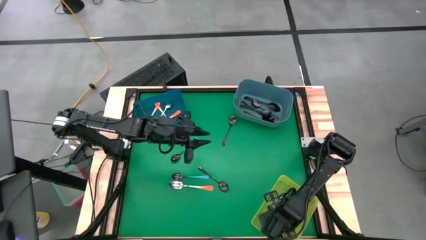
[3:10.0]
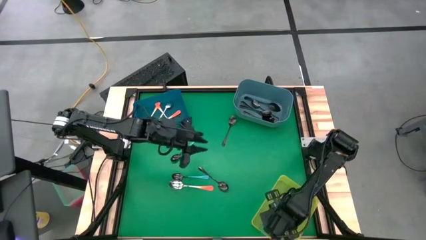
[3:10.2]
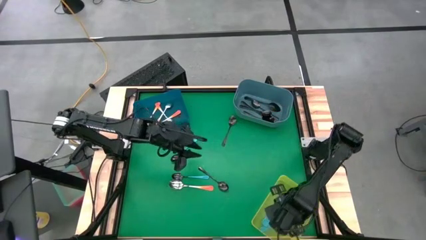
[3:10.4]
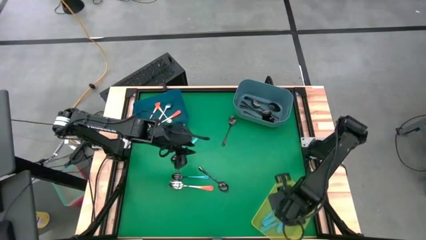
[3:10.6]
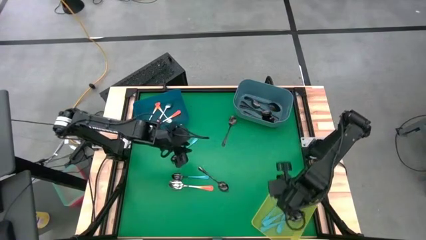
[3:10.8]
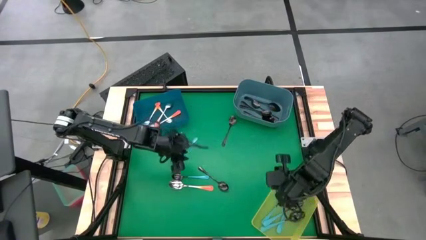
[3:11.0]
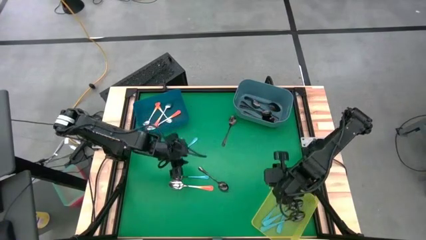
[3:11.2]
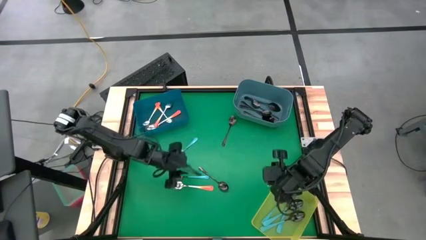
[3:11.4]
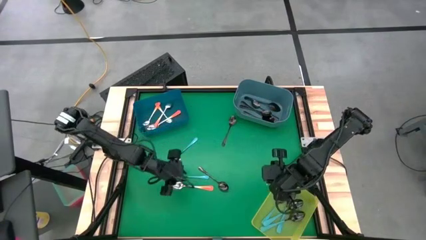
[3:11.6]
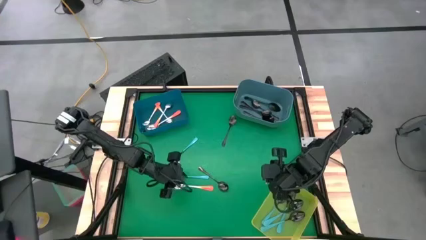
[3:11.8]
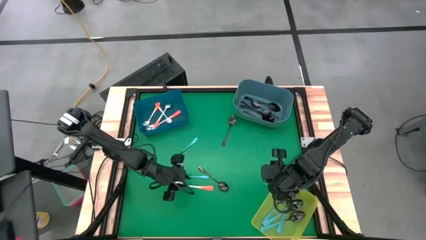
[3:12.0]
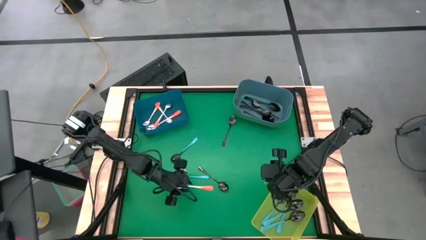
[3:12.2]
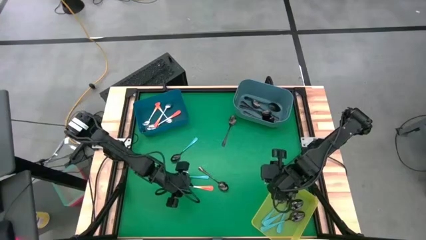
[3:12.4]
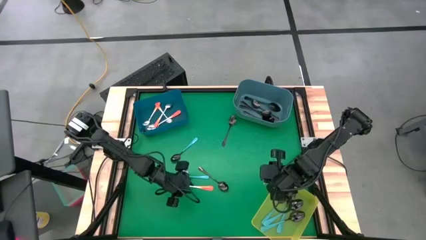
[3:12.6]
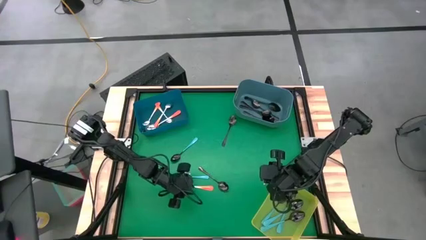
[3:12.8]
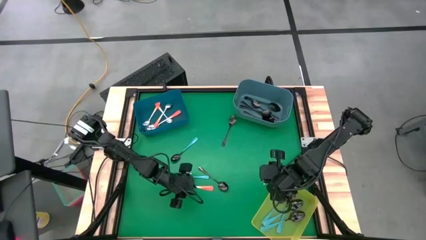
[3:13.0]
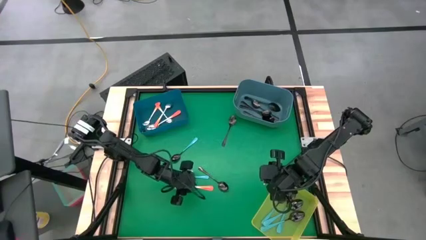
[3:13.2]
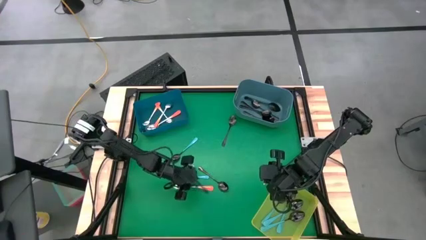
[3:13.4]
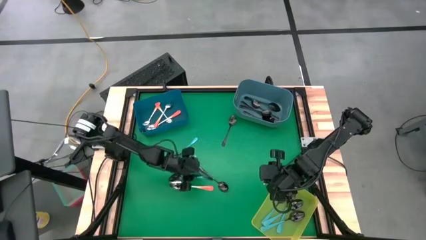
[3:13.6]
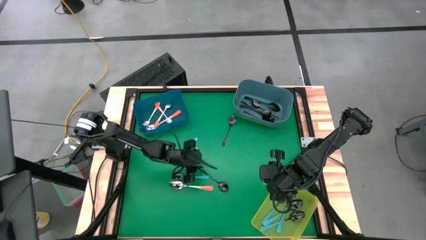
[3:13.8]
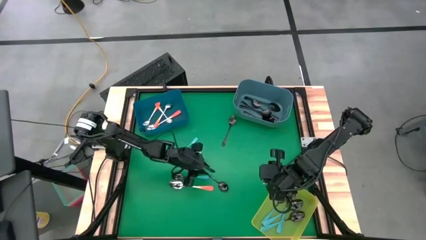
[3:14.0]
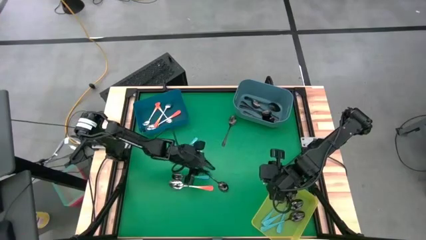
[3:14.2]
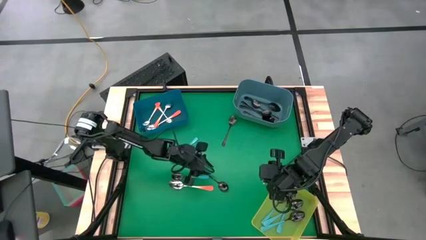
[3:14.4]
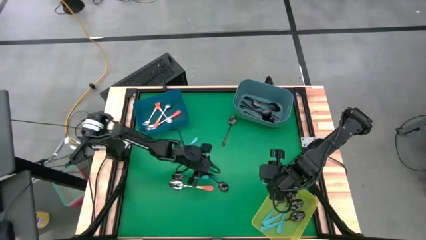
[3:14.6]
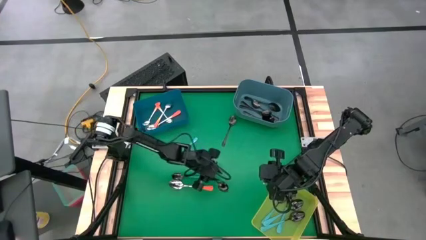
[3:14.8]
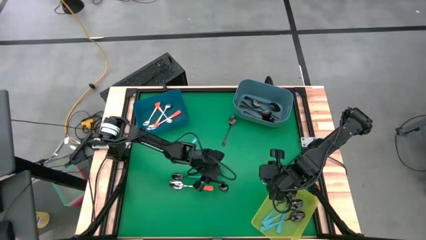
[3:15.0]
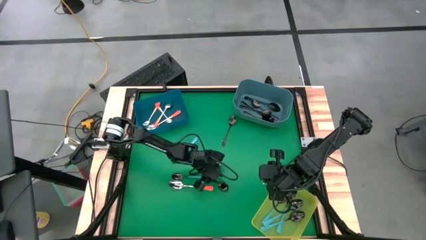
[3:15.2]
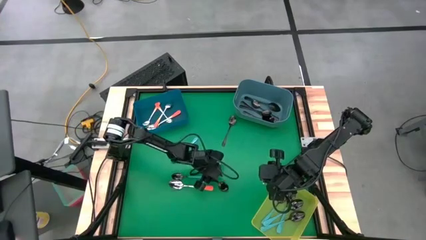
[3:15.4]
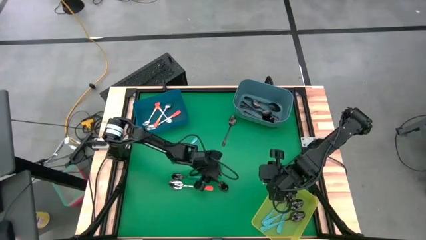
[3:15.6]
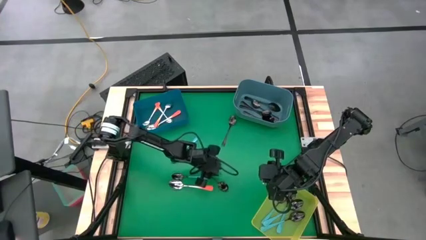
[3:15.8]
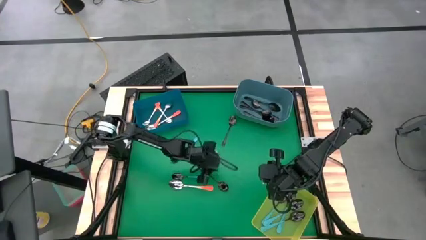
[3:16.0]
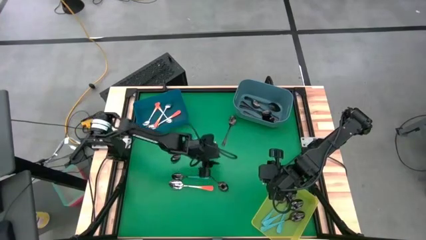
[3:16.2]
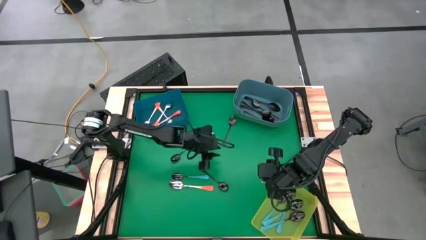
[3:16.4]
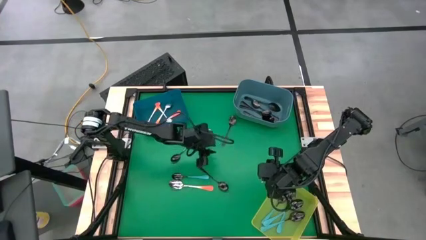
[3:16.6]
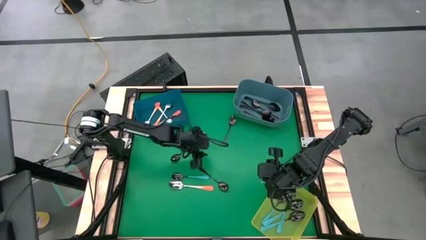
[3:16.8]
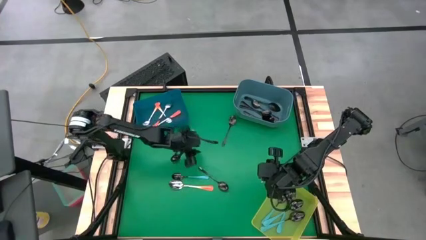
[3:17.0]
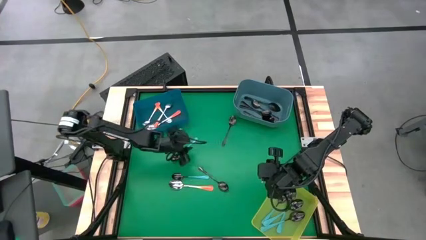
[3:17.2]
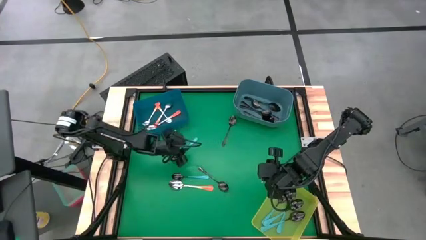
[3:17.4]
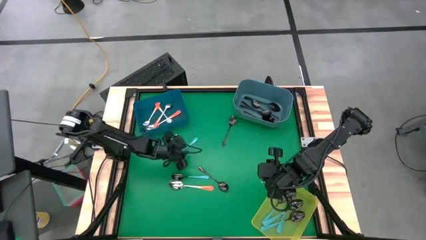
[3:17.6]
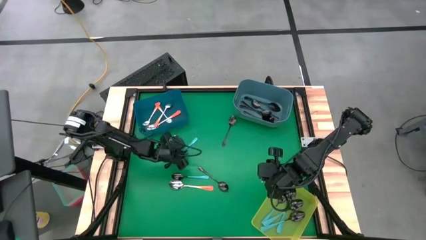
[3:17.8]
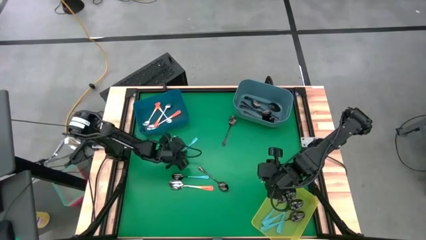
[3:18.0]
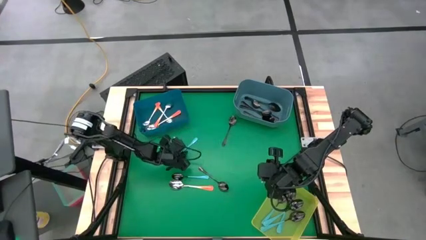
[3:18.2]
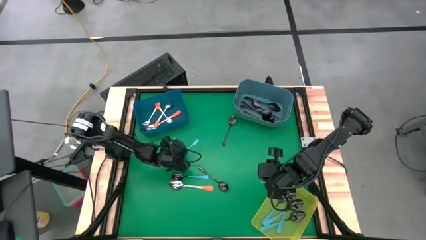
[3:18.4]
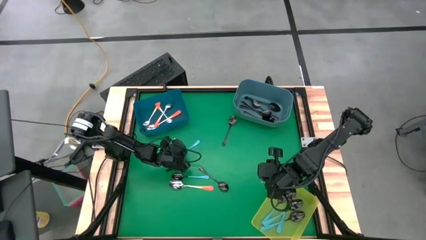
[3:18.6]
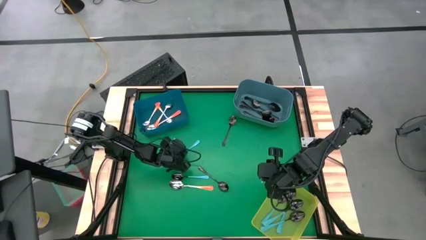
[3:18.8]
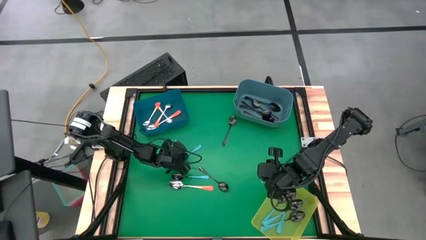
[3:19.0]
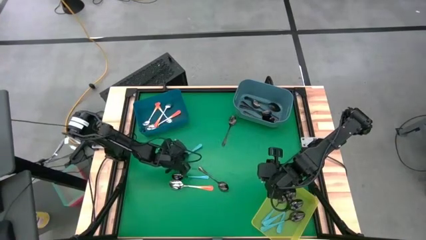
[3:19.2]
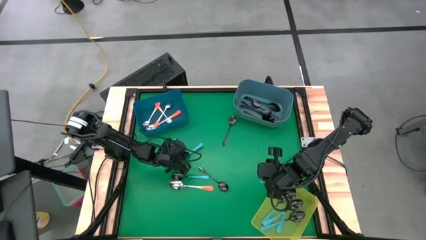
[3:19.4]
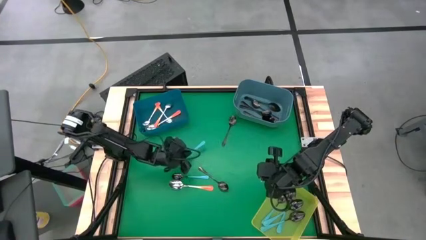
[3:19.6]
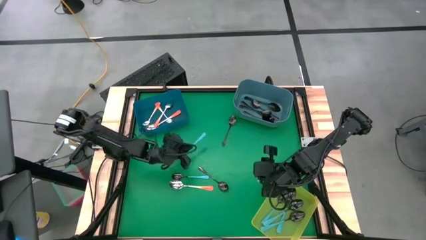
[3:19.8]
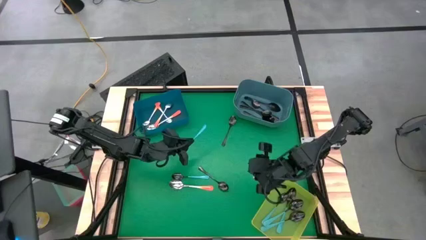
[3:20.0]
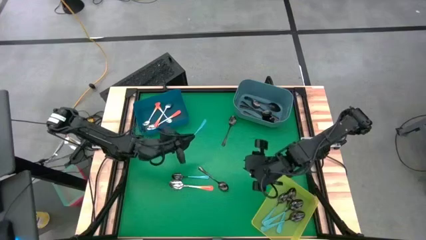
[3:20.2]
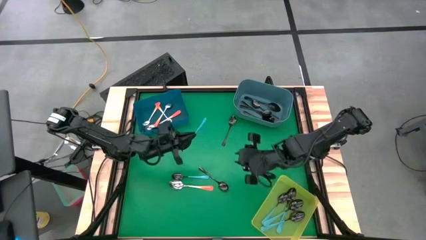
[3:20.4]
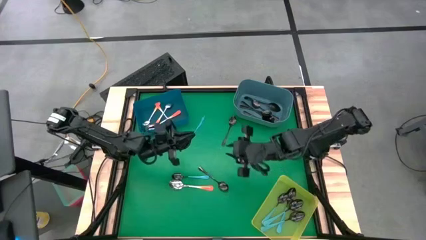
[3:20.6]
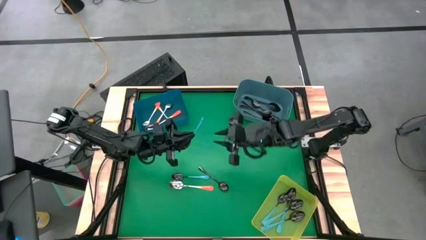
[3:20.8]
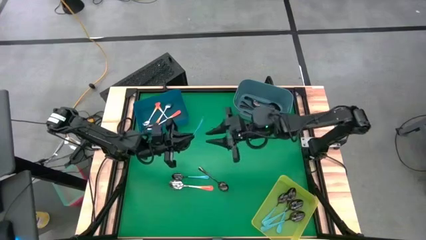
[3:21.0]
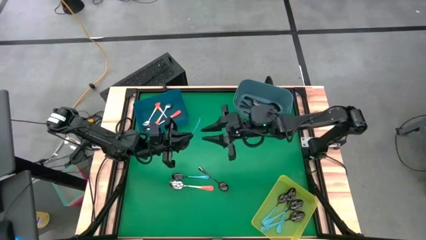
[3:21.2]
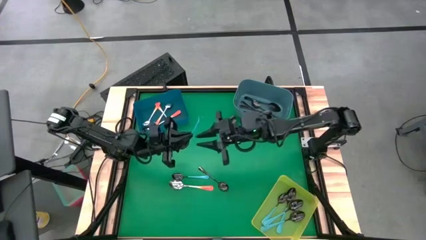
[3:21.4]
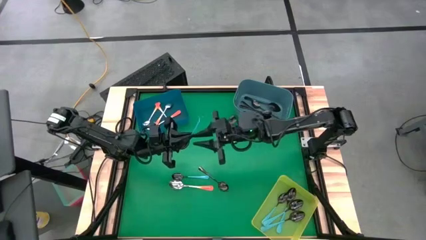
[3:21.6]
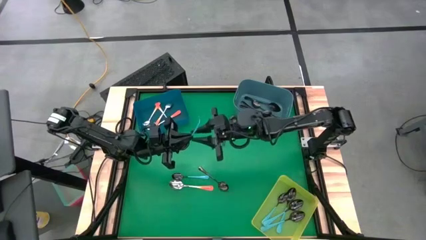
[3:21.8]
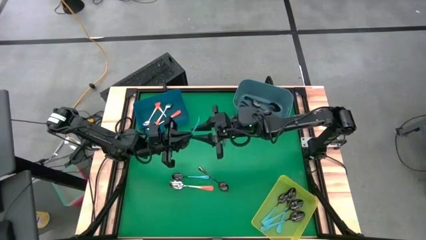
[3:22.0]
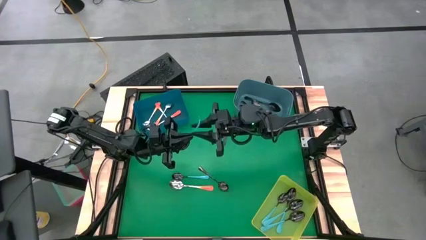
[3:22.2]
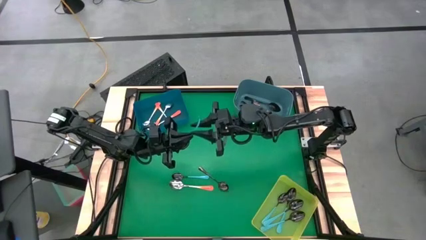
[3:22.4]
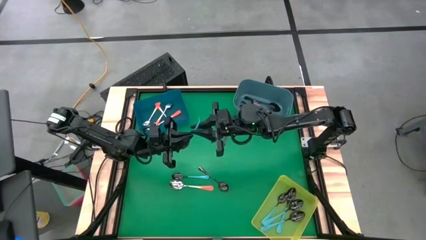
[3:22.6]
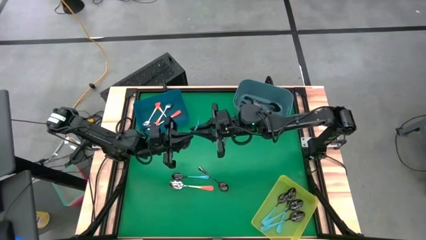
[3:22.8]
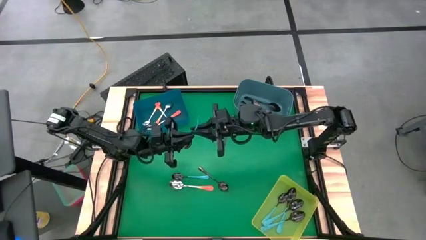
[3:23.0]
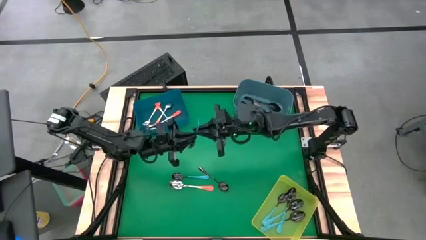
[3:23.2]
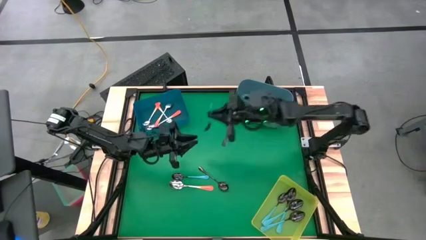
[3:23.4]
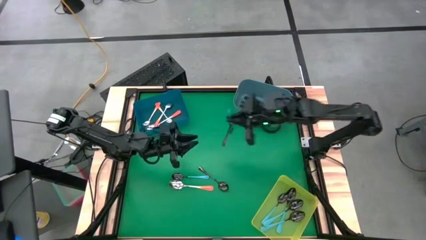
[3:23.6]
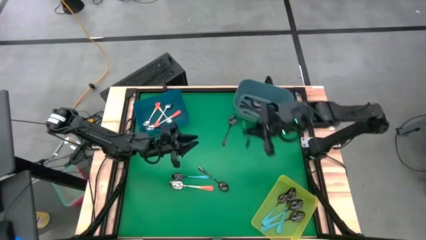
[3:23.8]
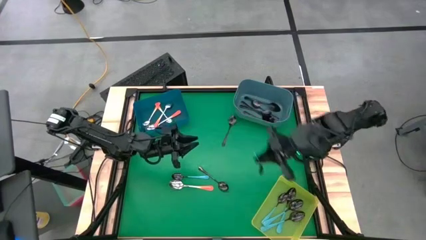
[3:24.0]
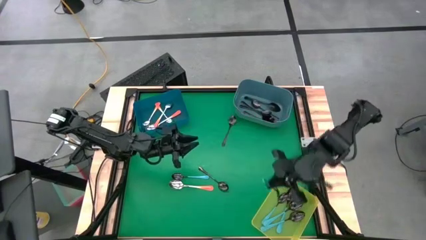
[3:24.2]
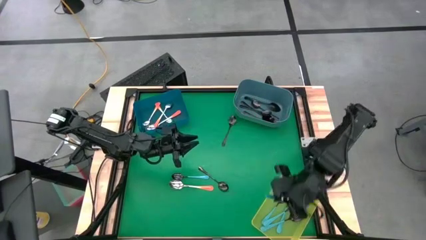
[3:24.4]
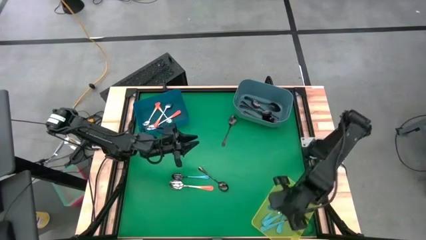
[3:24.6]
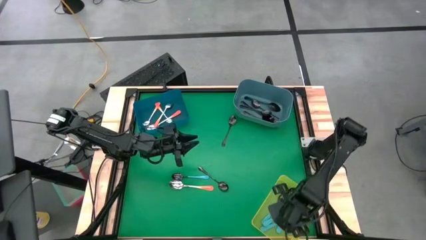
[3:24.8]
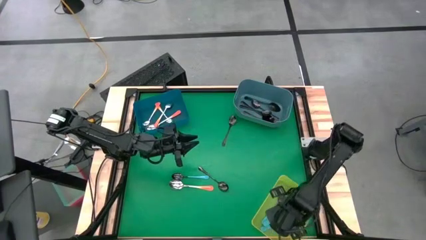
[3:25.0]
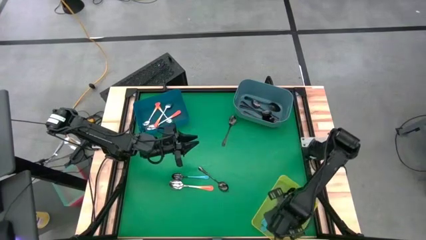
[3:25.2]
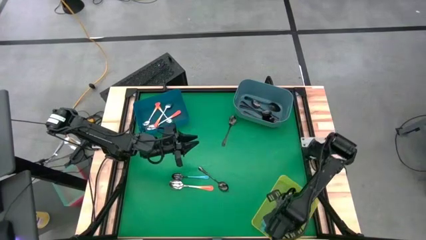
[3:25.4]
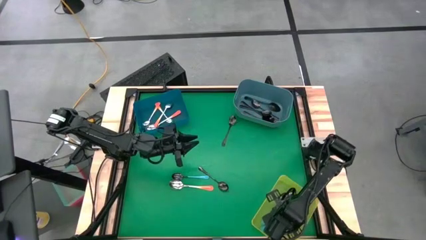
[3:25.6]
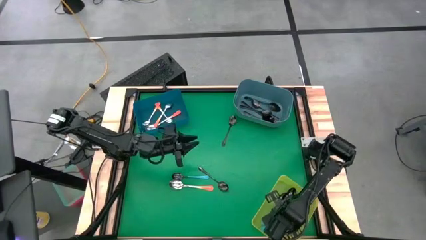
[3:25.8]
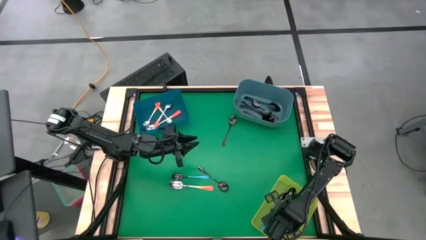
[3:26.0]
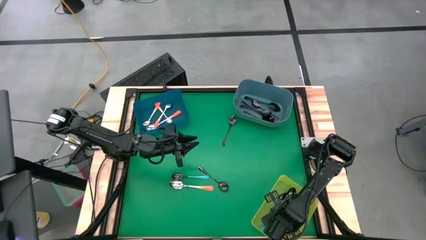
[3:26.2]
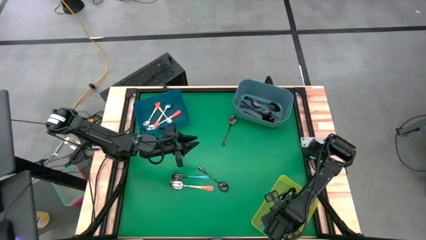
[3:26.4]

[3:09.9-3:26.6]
Task: Sort silverware by color (type)
Put the blue spoon into the yellow bin
